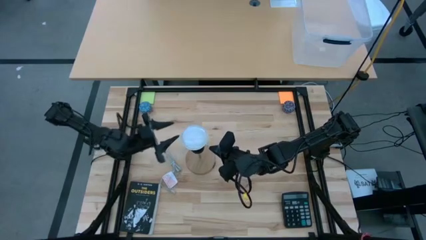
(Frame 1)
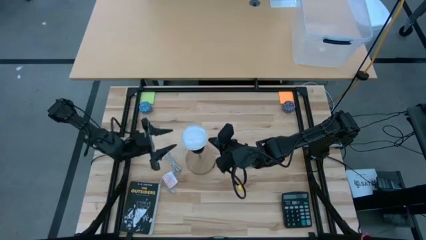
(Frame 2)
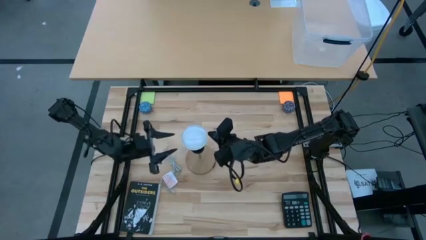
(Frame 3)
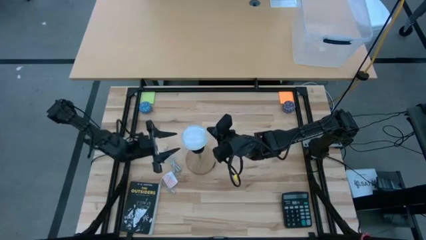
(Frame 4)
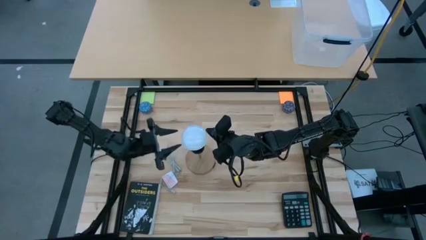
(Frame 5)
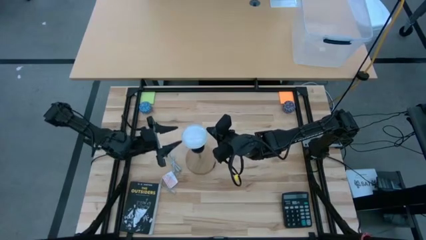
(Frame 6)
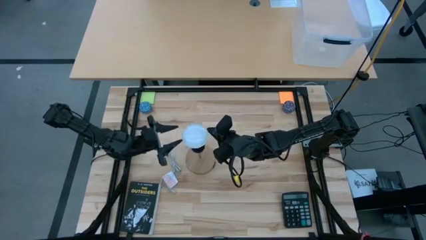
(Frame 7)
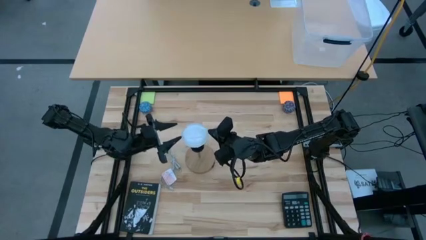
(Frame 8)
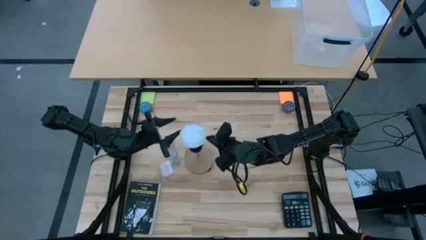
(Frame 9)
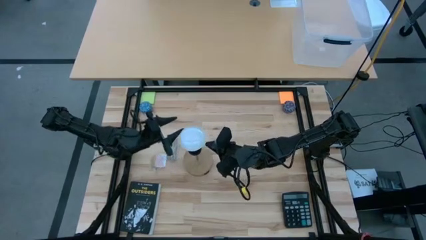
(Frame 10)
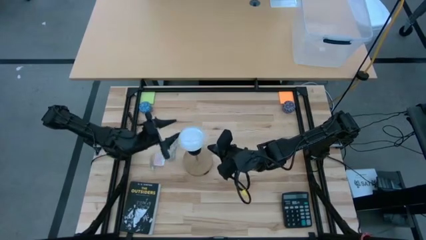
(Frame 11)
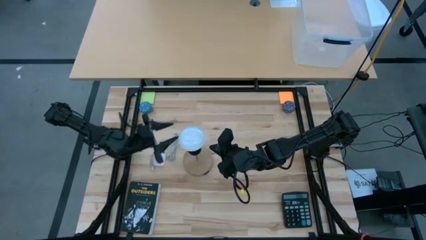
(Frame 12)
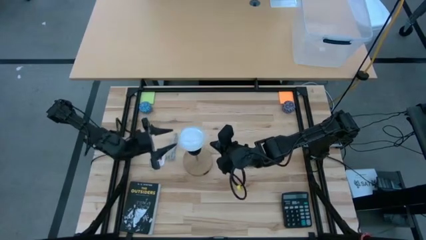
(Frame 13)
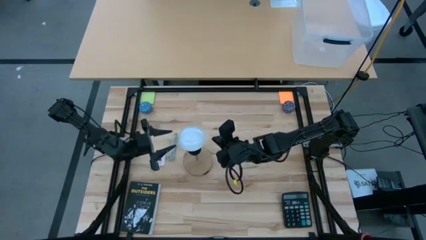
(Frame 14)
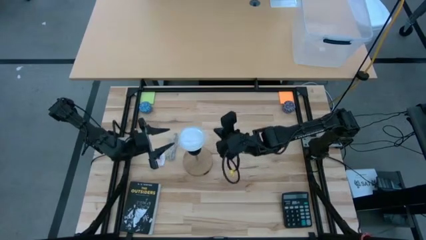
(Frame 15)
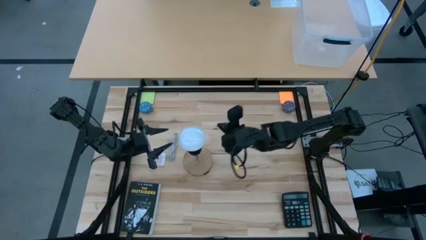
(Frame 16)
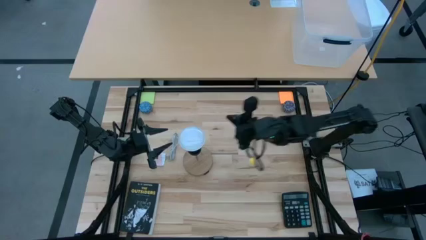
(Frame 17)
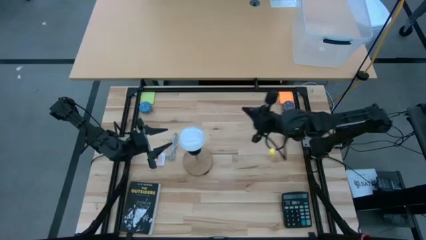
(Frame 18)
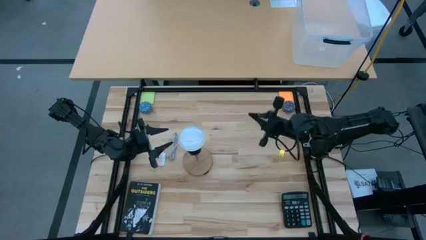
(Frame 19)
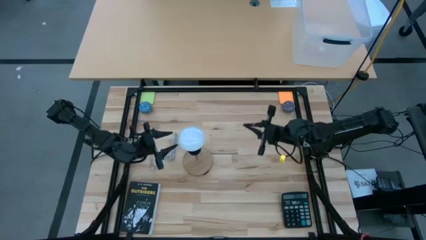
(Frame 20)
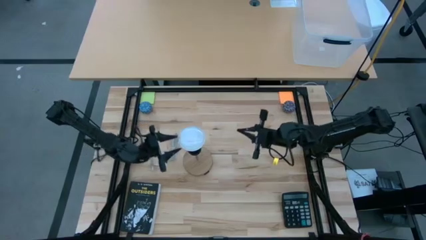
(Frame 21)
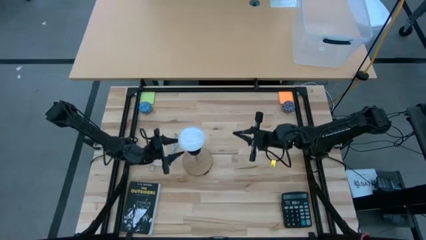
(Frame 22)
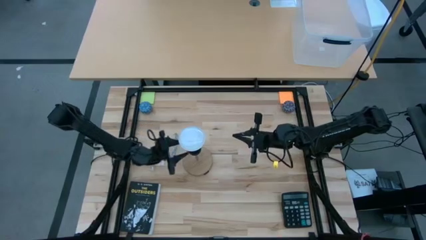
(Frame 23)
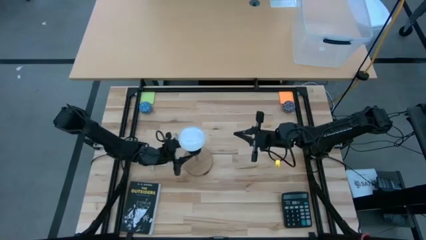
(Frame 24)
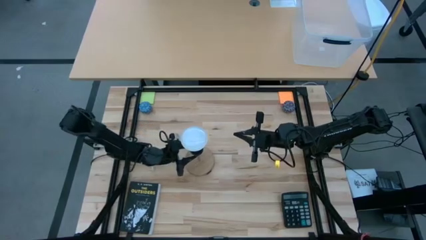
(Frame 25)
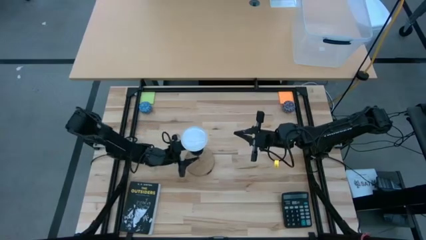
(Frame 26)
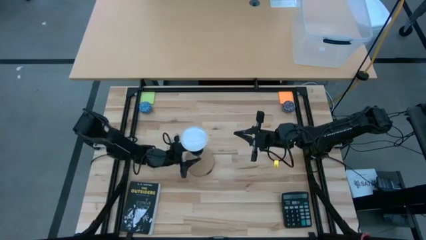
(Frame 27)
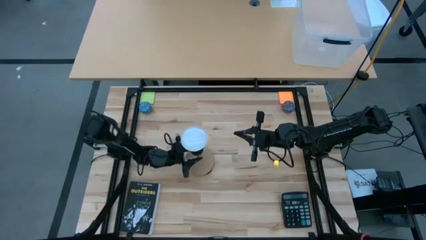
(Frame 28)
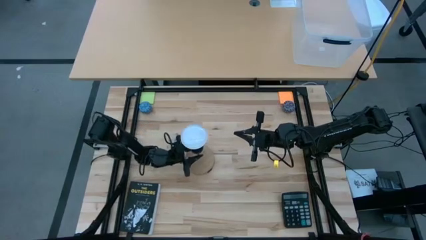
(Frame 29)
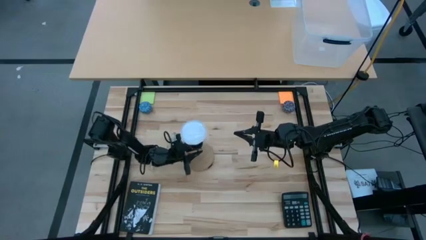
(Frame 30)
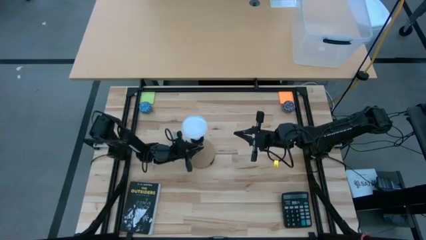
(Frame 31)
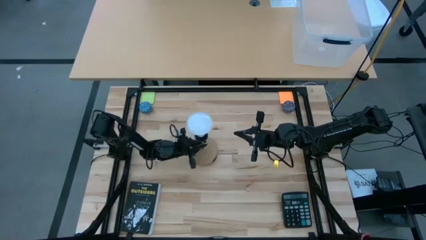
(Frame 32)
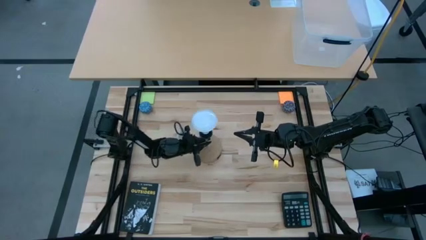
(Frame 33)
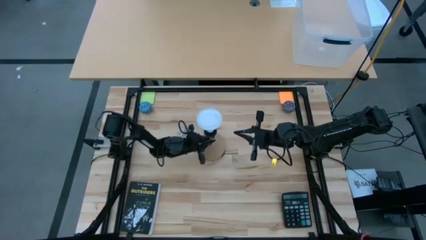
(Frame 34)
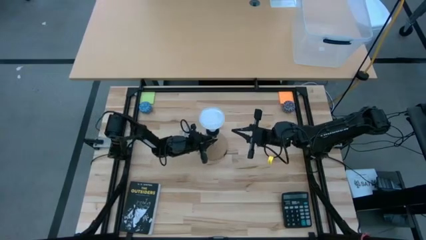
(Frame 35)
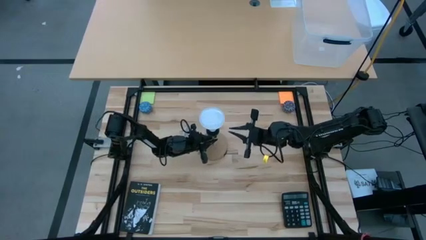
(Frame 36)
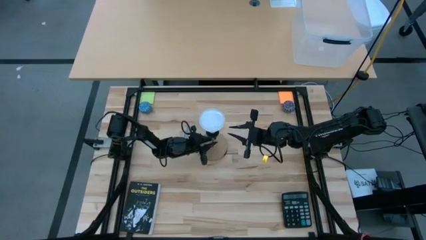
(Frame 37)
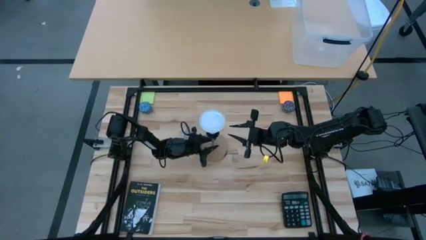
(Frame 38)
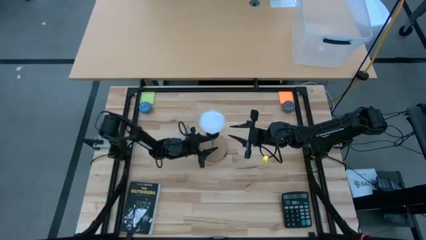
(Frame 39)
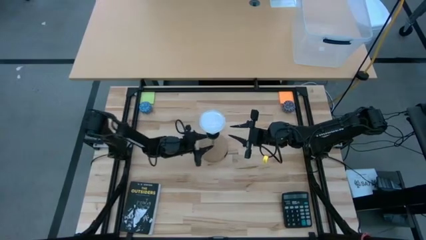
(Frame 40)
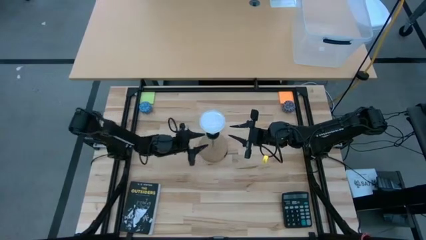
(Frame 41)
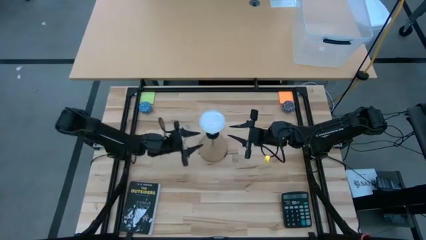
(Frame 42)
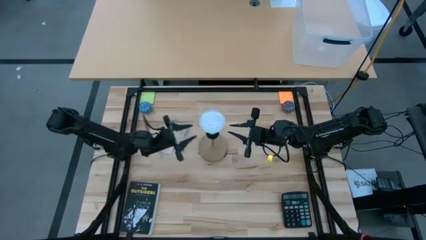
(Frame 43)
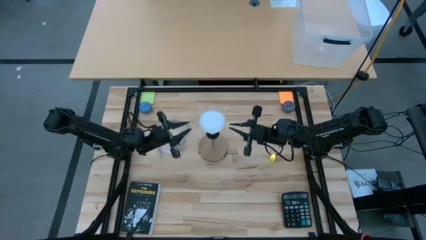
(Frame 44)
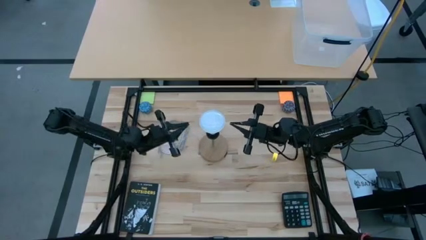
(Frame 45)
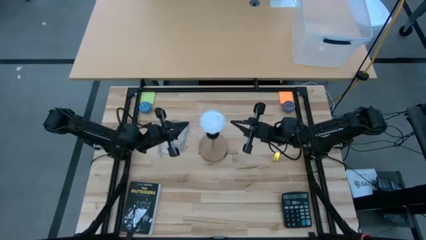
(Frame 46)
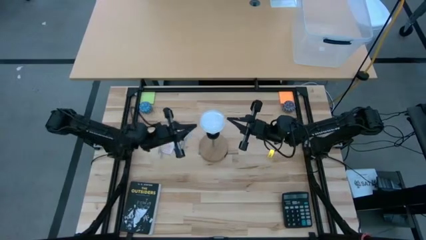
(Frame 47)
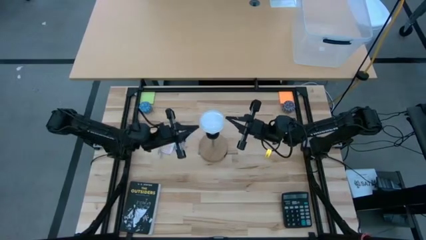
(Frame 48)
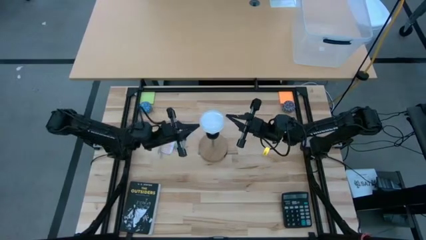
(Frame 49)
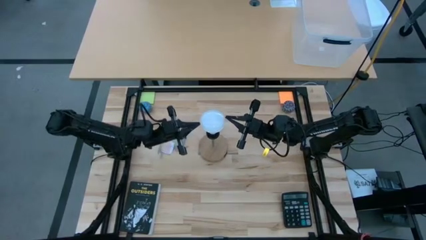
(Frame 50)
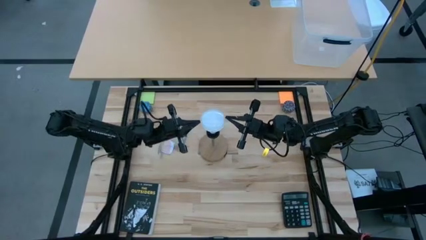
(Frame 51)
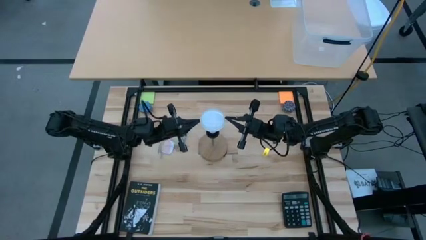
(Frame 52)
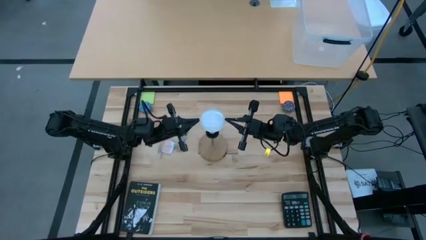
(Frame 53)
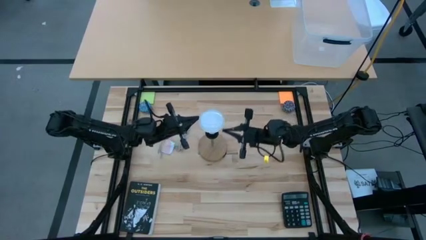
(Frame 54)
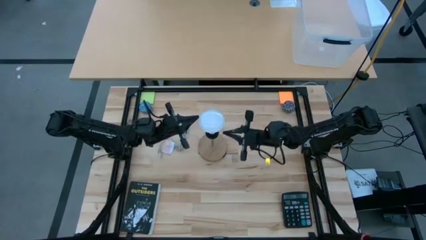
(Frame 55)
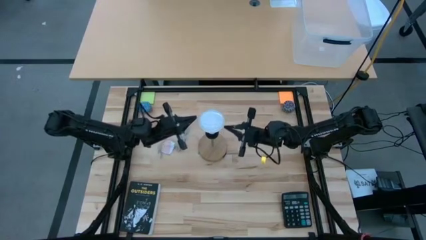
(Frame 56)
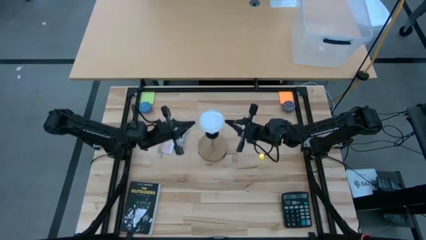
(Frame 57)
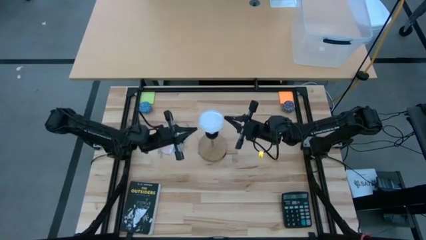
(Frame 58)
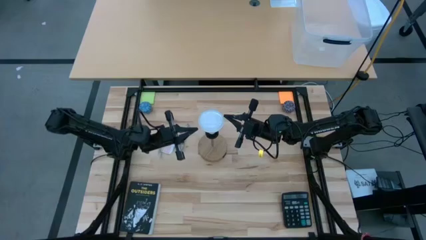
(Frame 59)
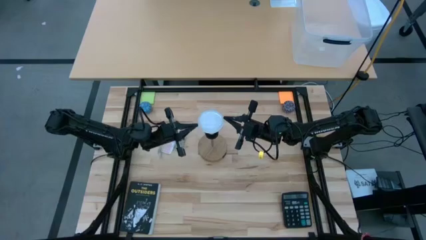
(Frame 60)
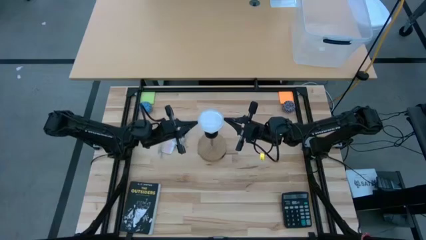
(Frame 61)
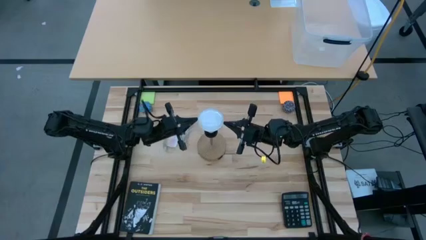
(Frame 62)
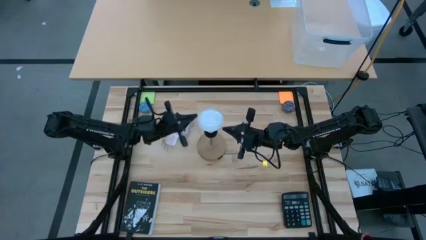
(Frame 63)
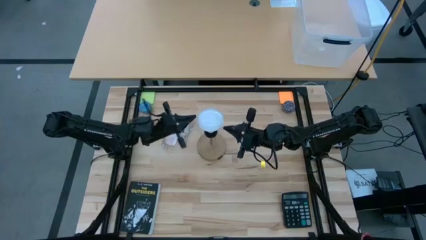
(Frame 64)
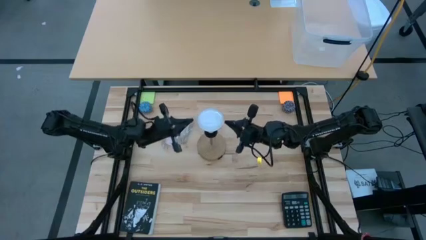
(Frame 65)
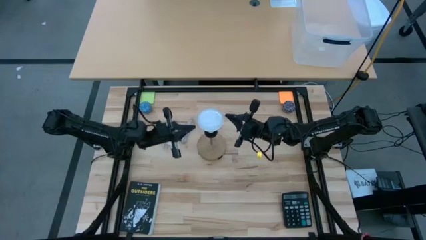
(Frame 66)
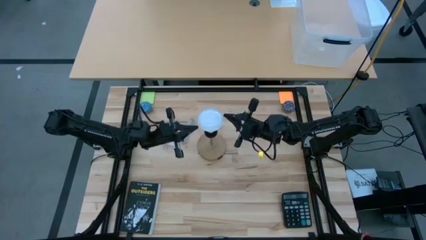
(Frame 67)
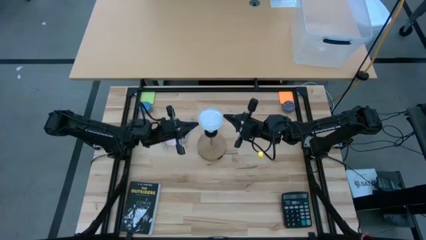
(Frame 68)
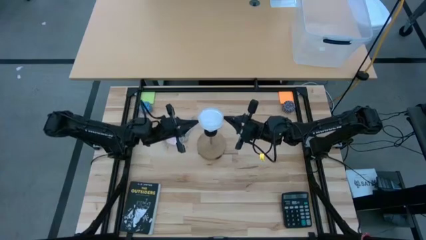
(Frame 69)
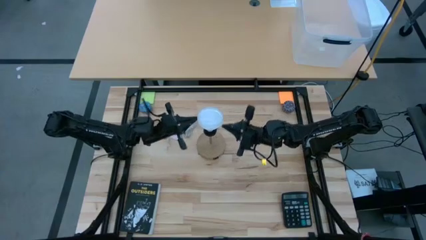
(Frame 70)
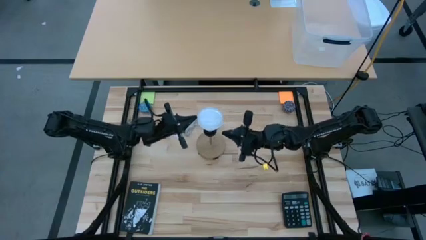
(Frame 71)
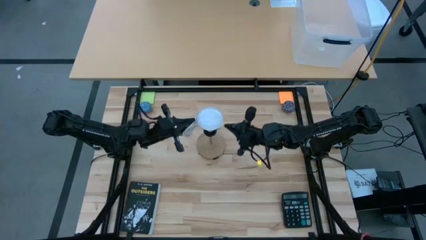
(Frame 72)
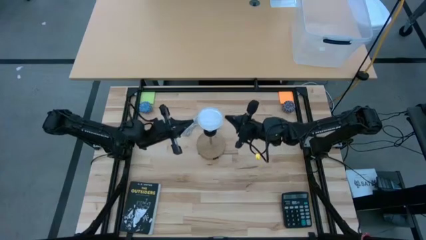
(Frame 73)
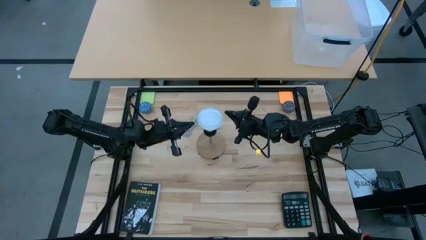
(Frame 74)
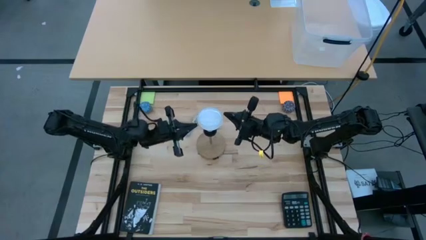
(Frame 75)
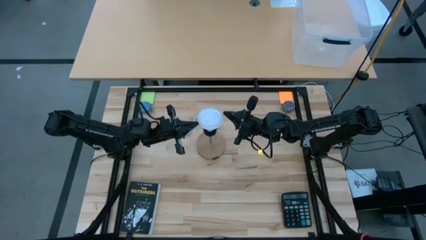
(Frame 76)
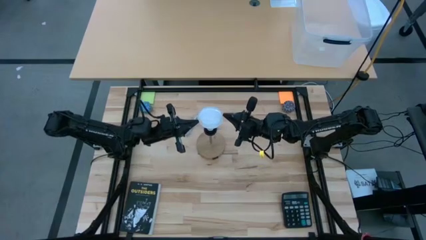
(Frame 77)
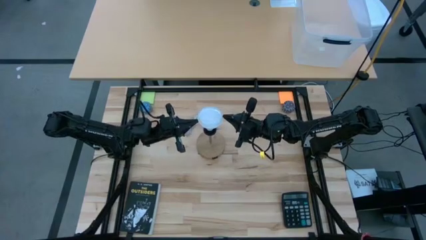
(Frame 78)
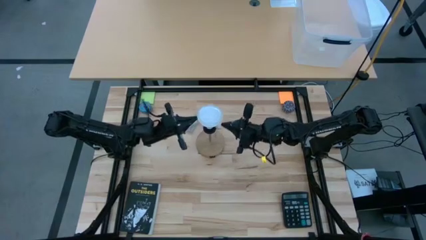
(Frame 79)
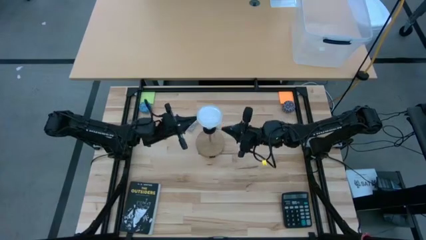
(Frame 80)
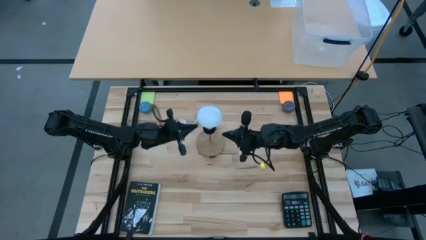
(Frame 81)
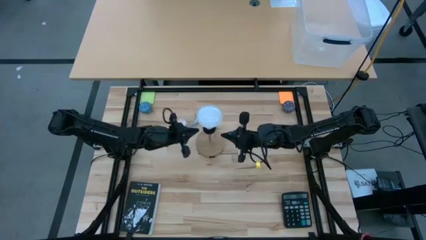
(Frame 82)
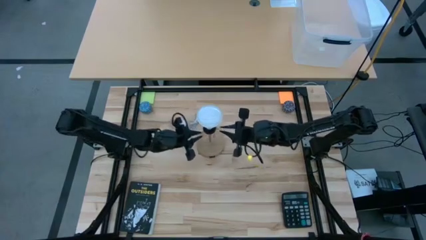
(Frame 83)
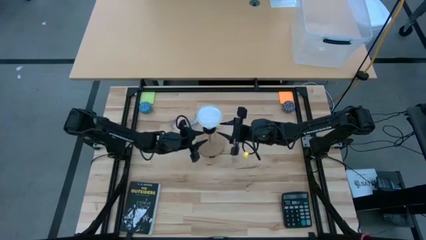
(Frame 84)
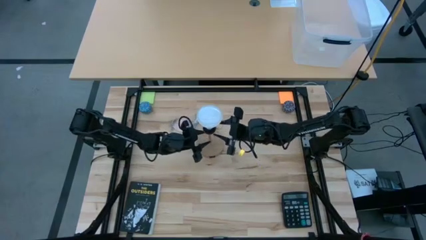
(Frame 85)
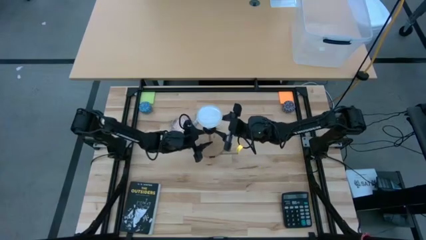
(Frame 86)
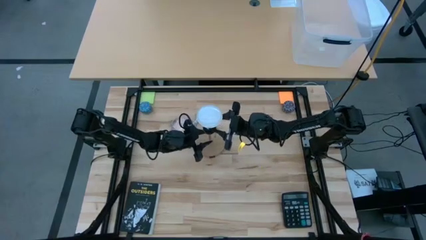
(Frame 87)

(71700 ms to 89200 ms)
Task: Screw lightbulb
Insert the lightbulb on the lamp
